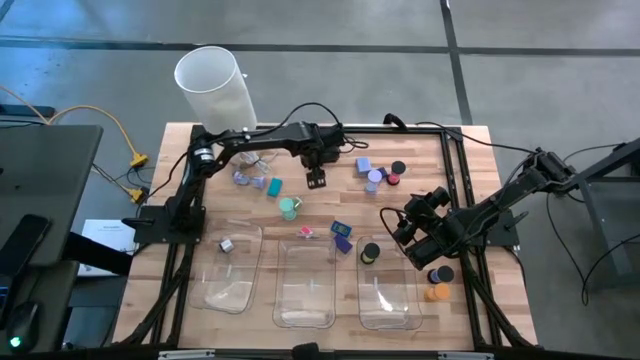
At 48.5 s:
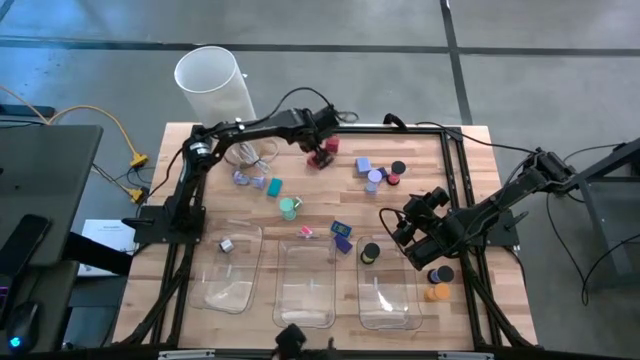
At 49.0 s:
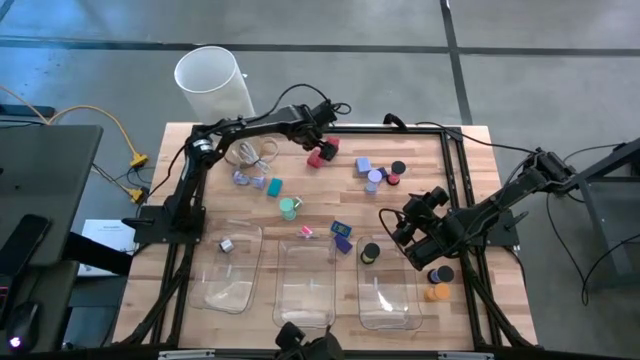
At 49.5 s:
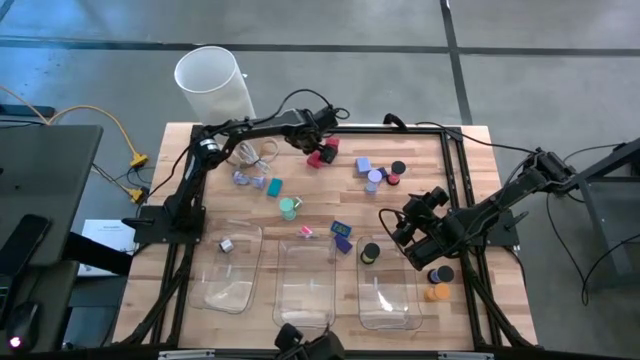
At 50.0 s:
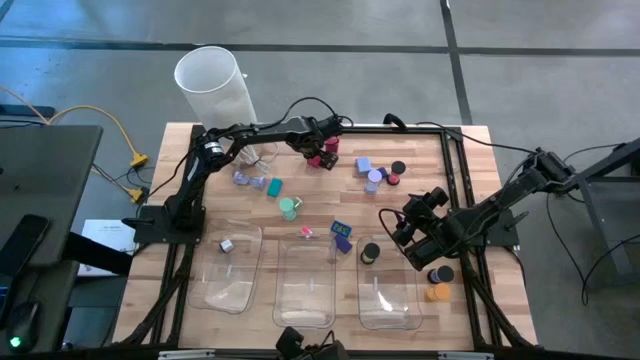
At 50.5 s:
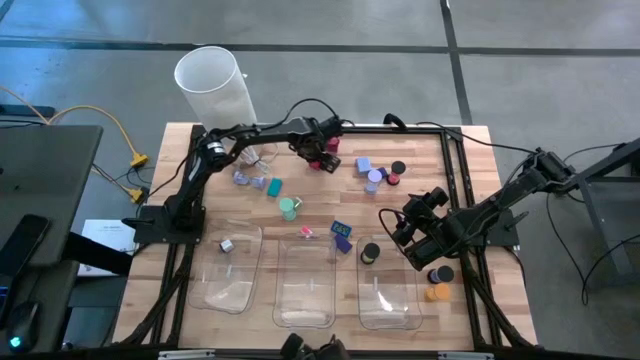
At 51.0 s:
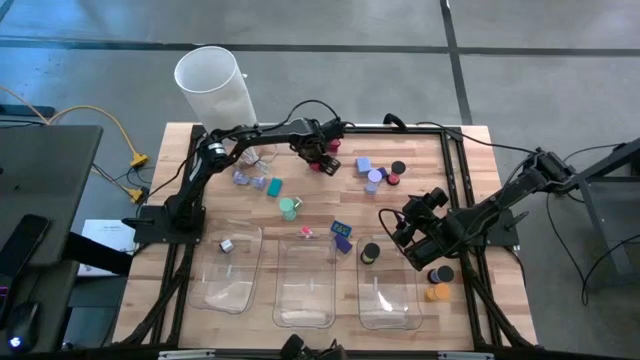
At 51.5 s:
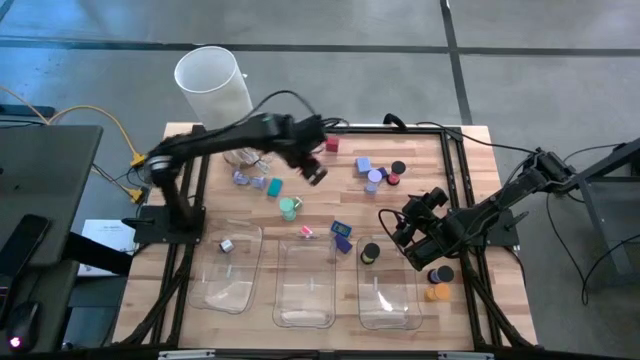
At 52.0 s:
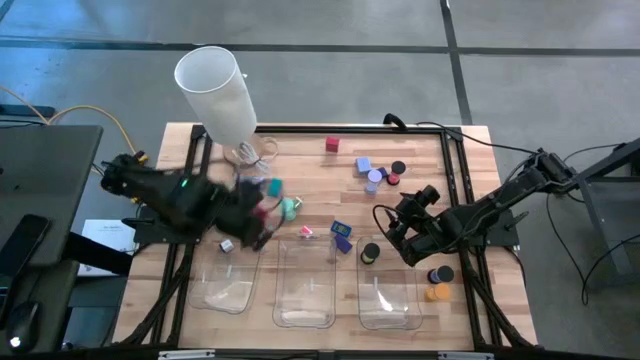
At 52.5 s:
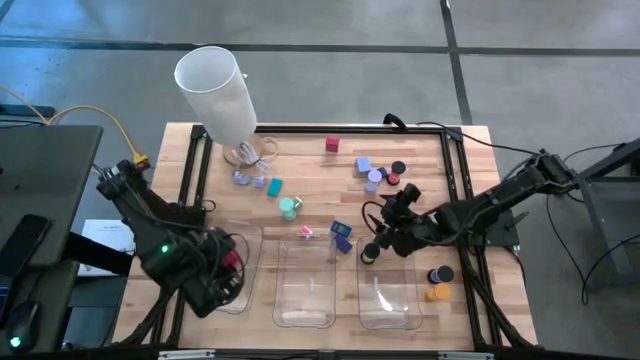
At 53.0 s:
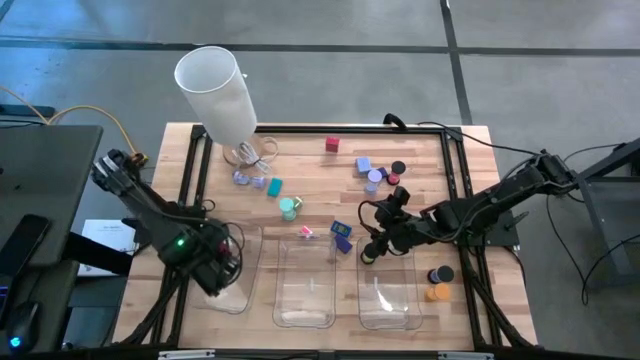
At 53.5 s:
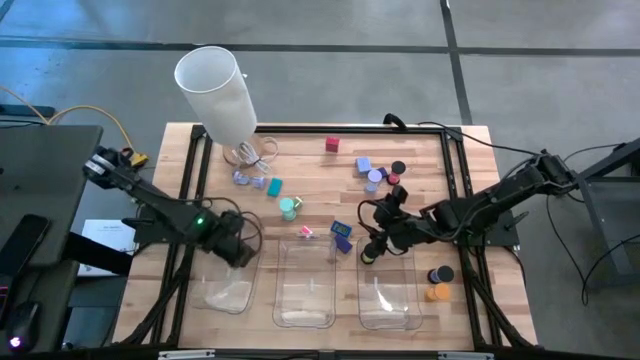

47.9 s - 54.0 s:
Task: Pick & Place Office items
Put the red adapter into the left bin

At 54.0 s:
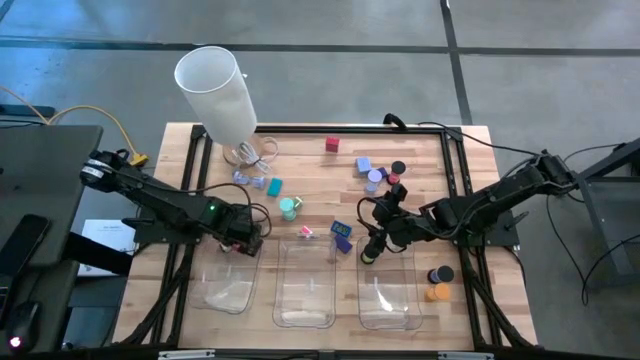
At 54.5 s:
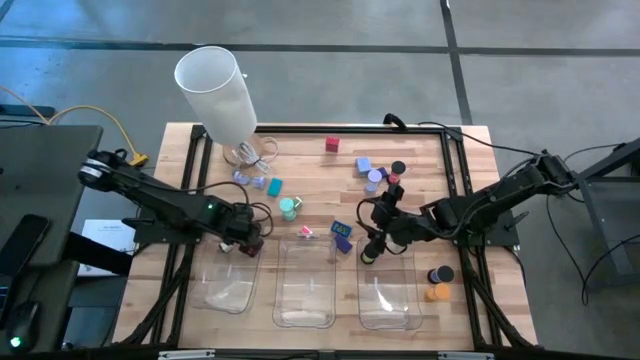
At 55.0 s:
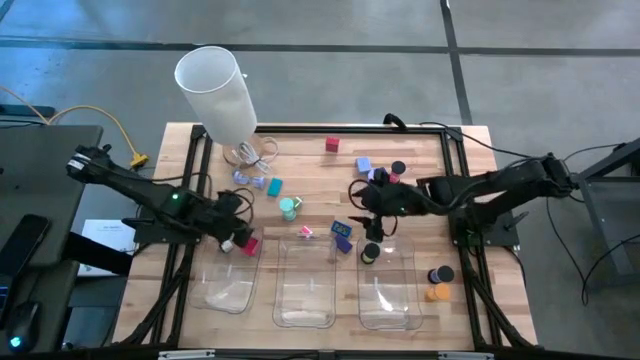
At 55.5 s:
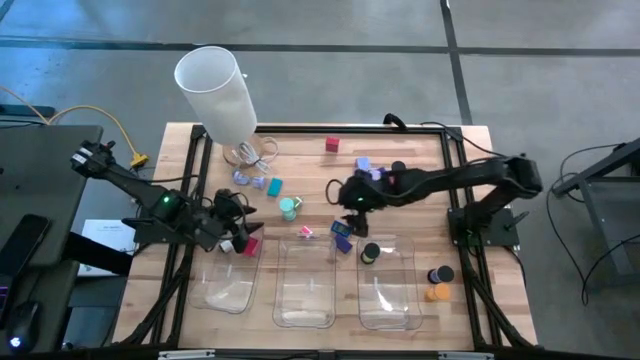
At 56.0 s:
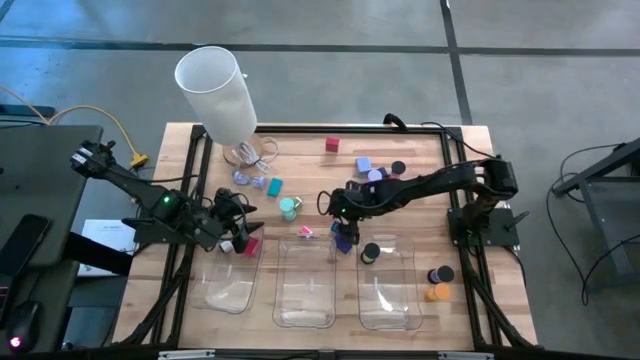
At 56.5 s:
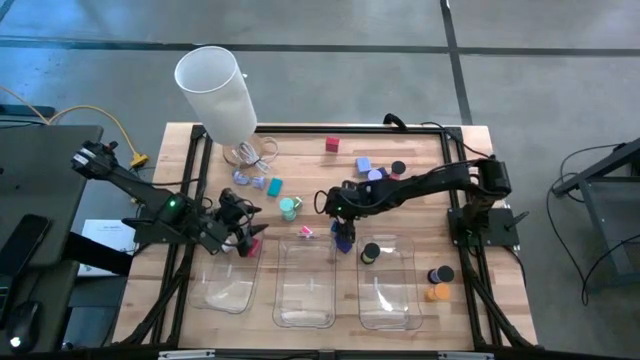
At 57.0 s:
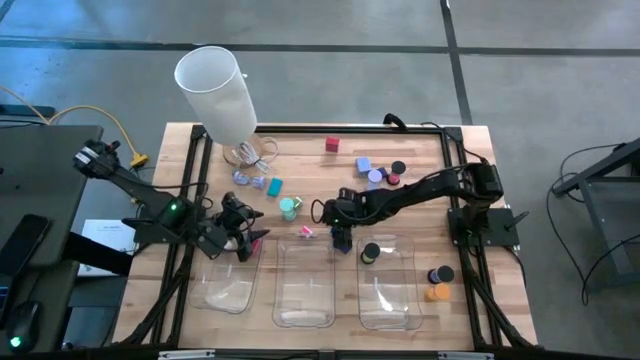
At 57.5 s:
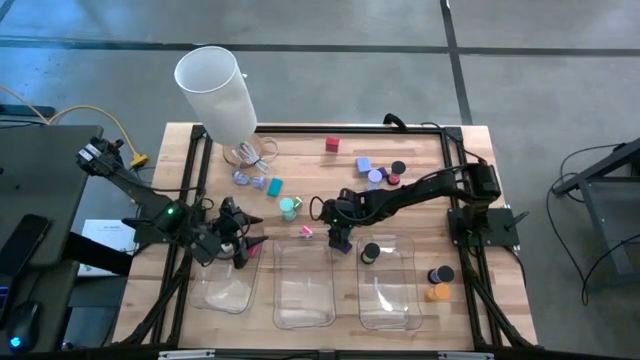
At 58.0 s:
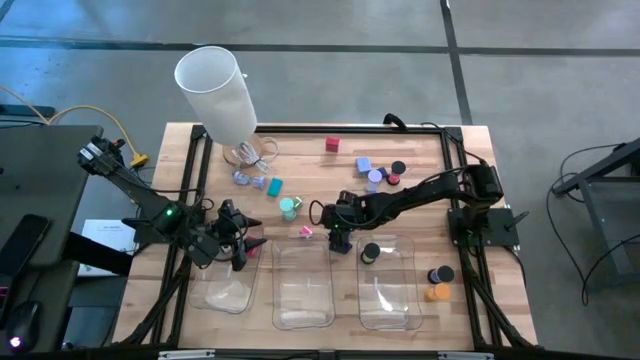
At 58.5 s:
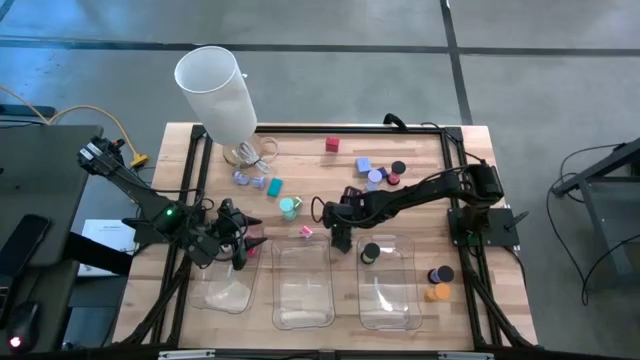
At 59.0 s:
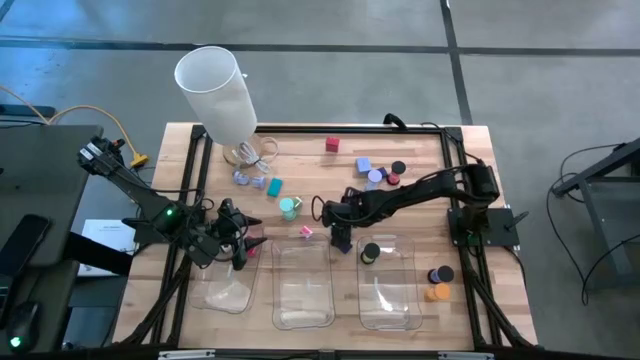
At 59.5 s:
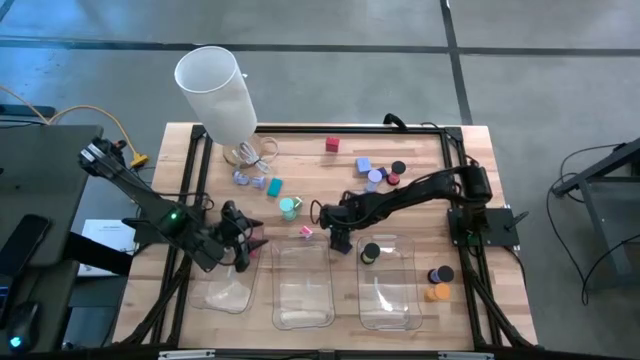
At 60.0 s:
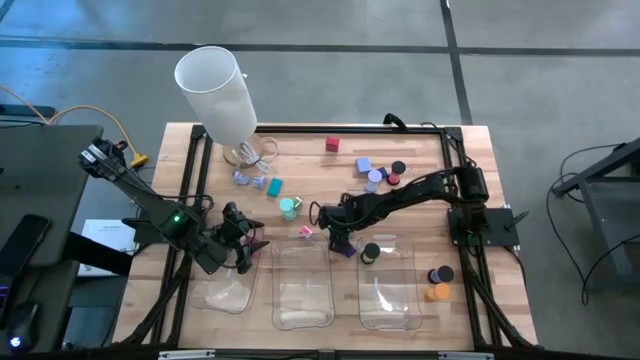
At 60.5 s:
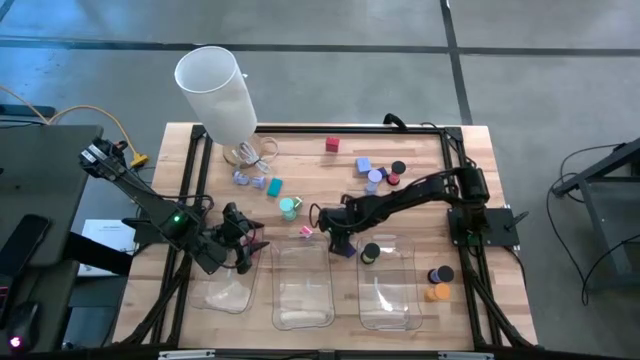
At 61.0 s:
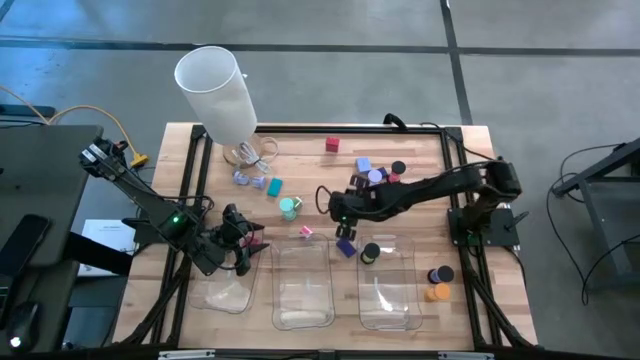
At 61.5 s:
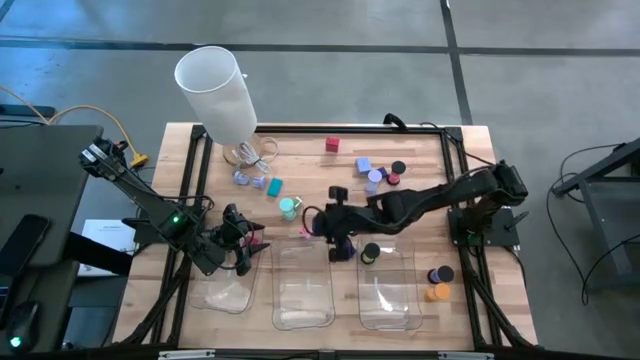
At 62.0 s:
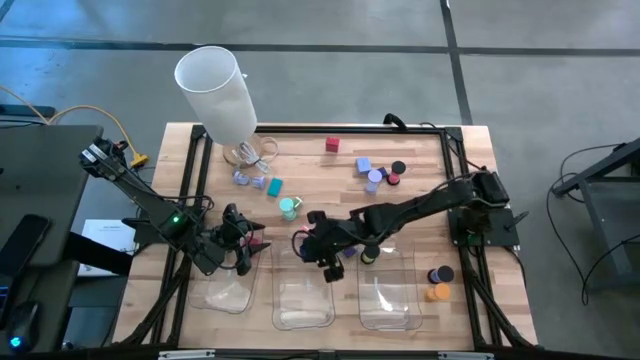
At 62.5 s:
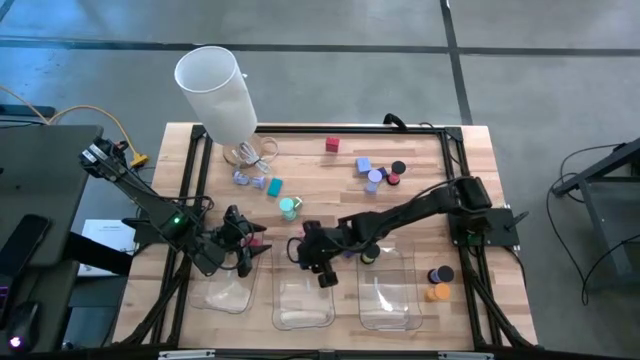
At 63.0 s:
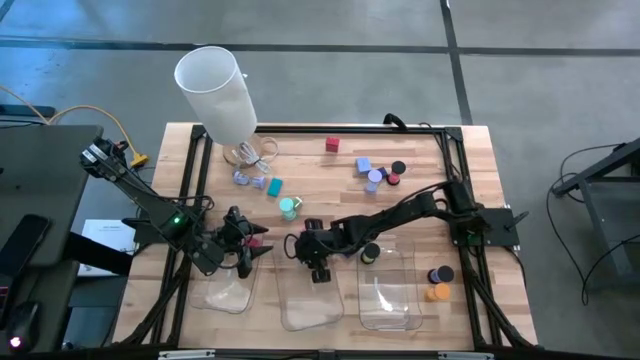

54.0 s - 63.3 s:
Put the middle blue clock into the middle bin

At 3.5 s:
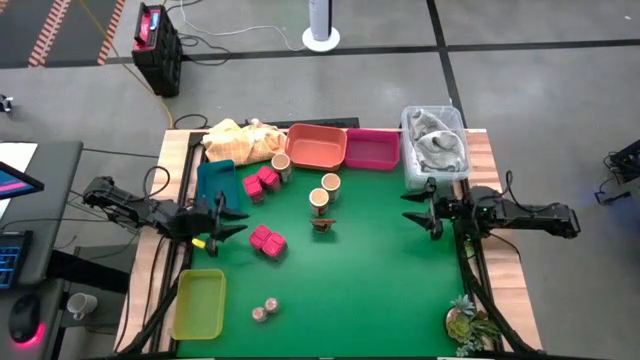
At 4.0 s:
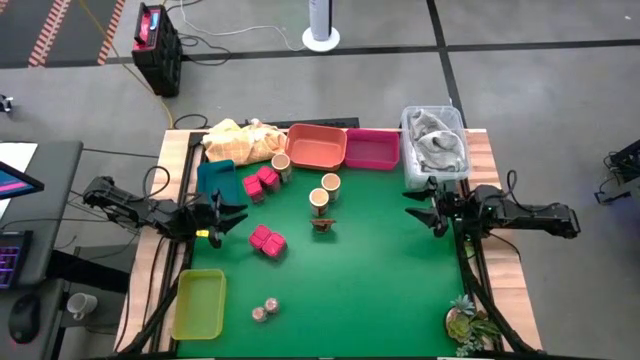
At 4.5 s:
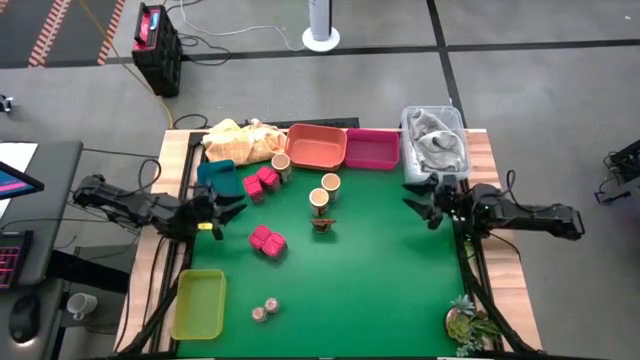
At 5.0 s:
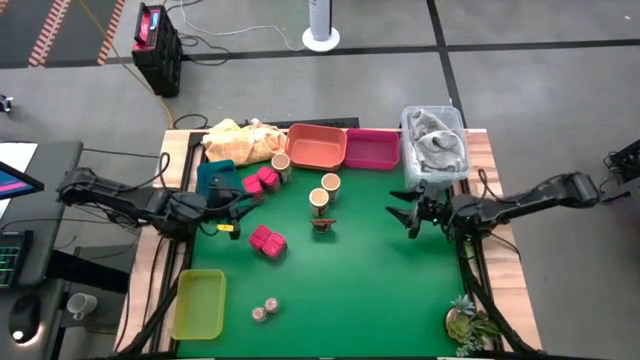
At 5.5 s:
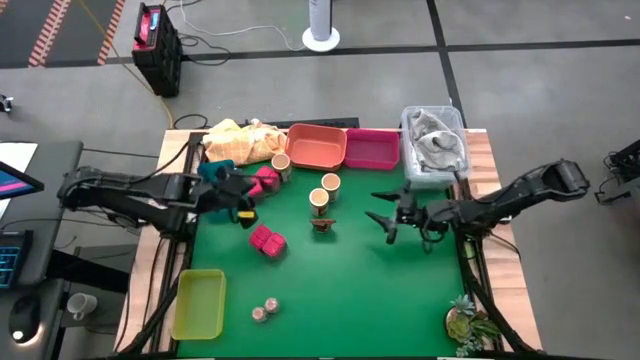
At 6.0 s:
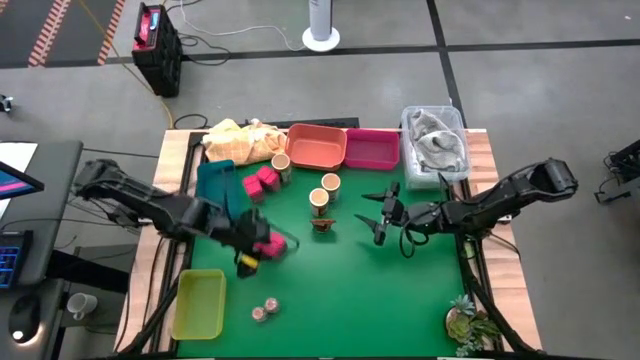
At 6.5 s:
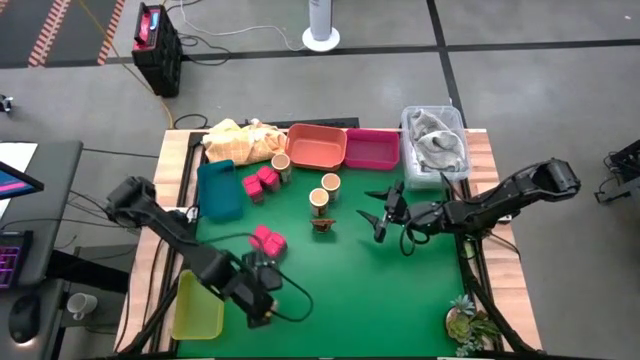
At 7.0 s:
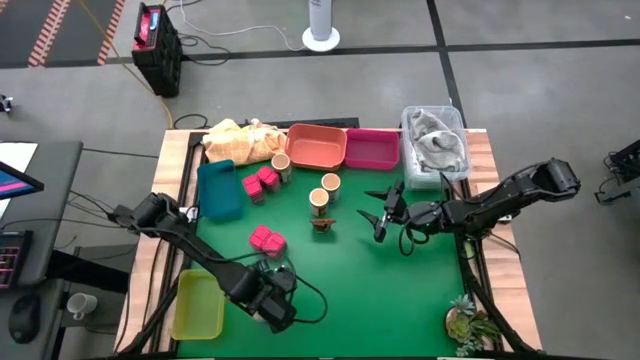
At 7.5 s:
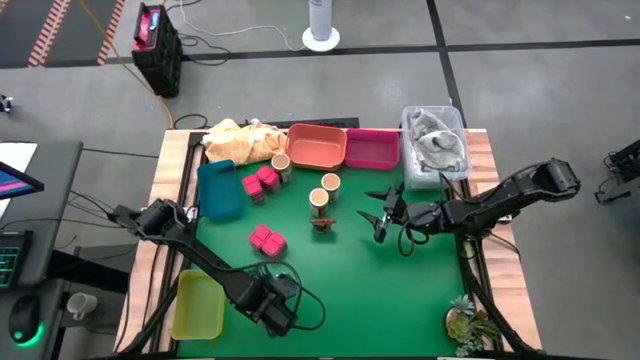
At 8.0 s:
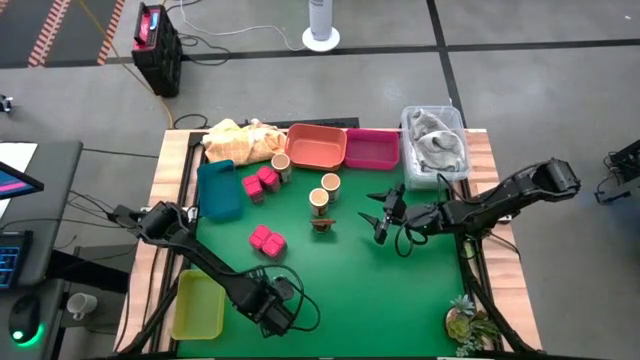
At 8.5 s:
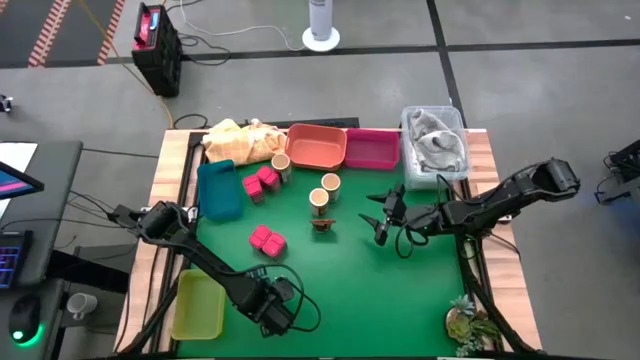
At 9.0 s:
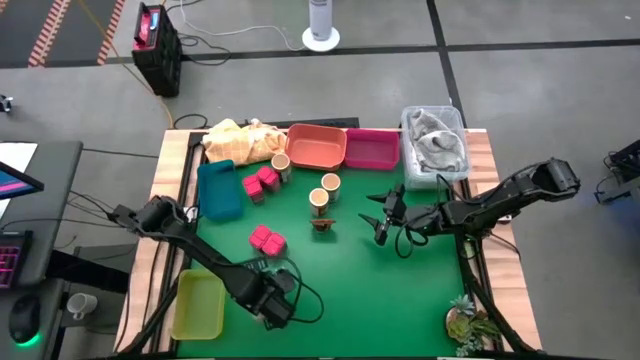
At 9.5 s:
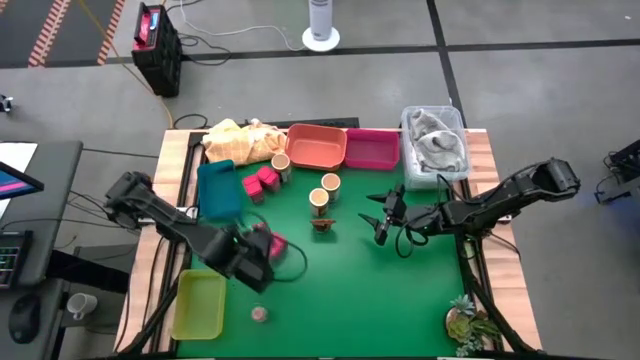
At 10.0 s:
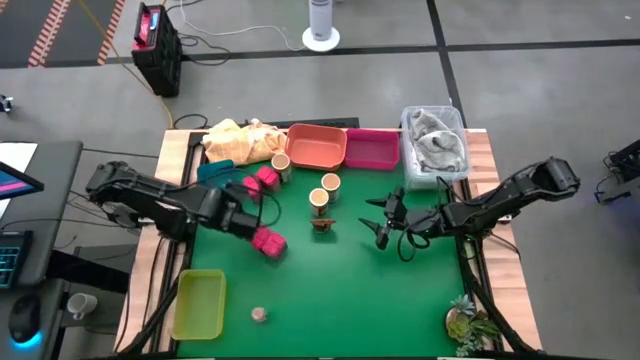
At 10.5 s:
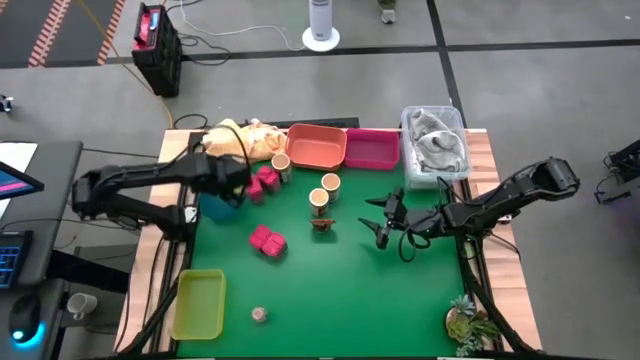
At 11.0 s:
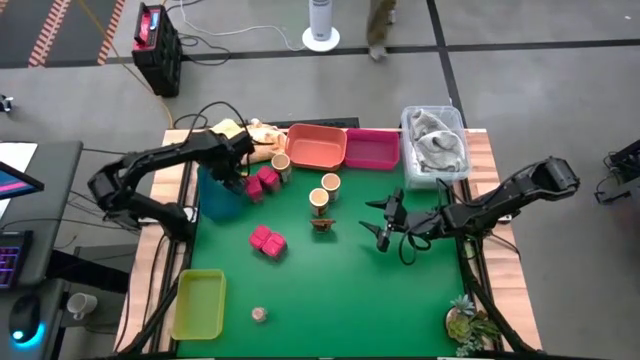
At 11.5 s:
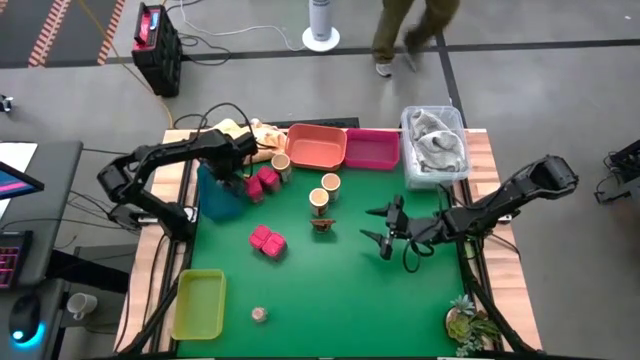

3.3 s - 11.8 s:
Task: Sort spices by type
Put the right small brown seasoning bottle into the blue bin
